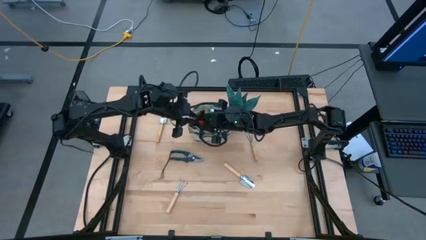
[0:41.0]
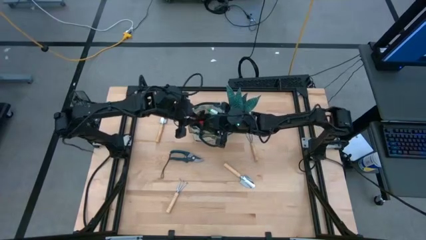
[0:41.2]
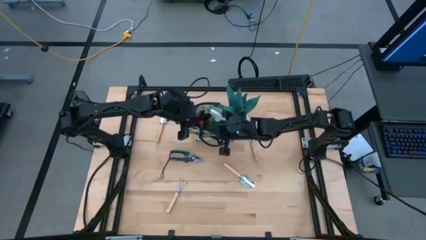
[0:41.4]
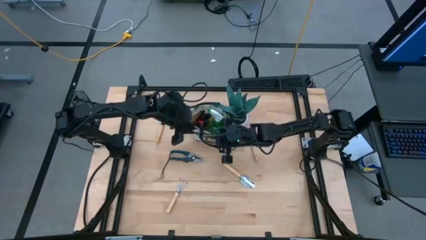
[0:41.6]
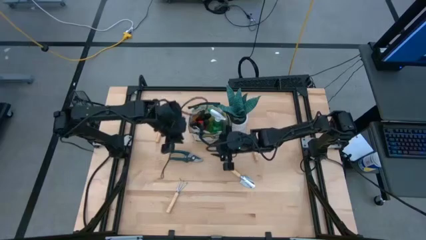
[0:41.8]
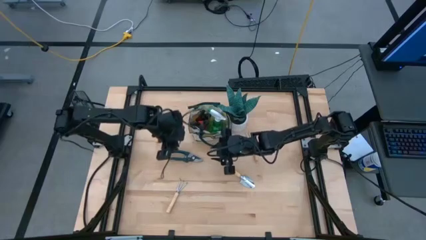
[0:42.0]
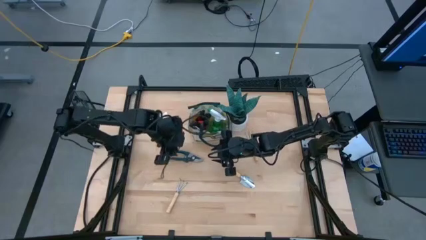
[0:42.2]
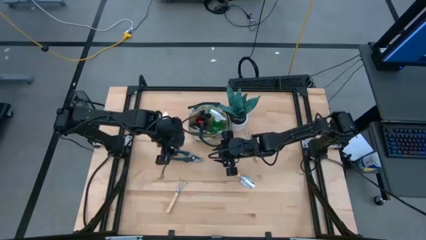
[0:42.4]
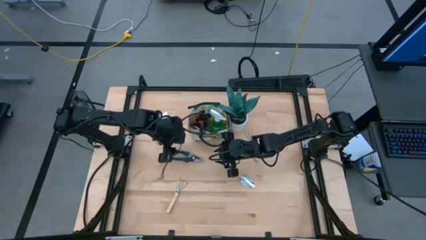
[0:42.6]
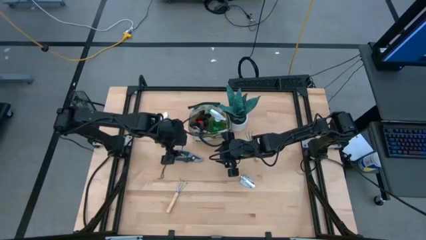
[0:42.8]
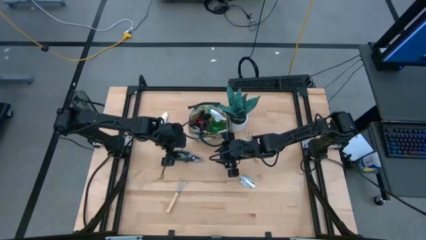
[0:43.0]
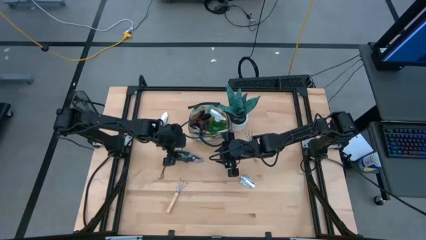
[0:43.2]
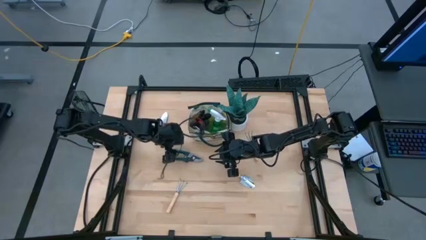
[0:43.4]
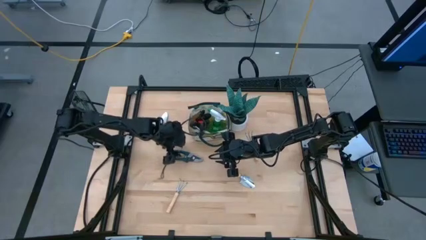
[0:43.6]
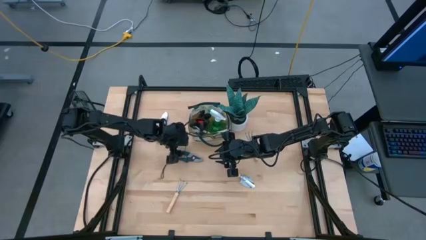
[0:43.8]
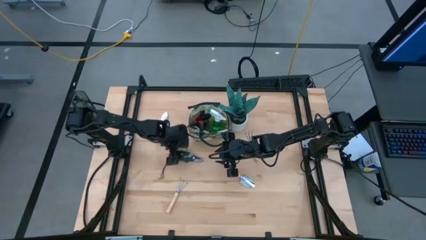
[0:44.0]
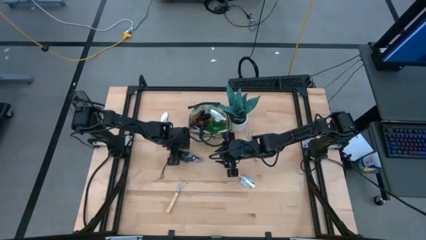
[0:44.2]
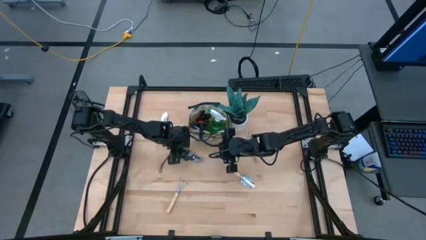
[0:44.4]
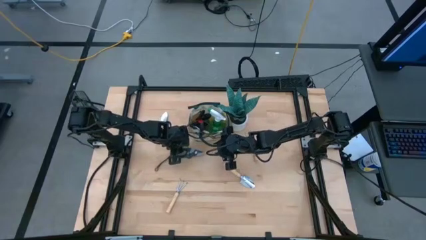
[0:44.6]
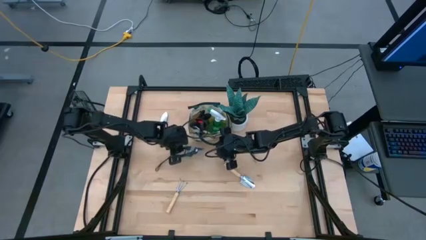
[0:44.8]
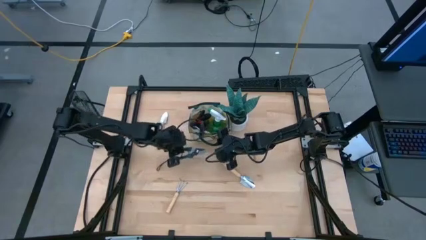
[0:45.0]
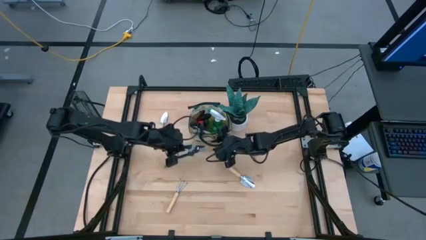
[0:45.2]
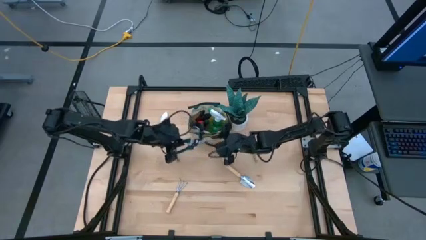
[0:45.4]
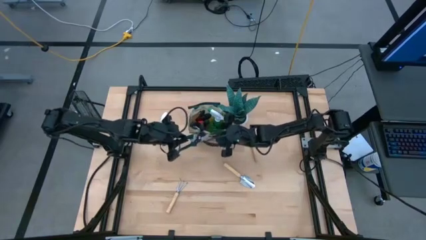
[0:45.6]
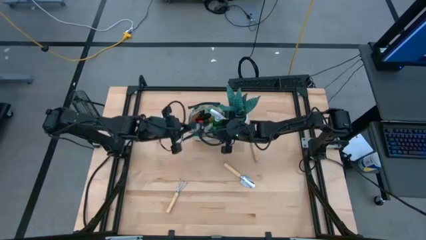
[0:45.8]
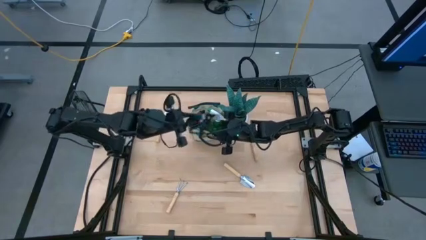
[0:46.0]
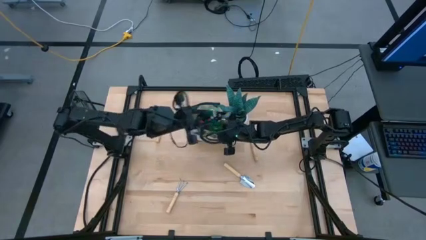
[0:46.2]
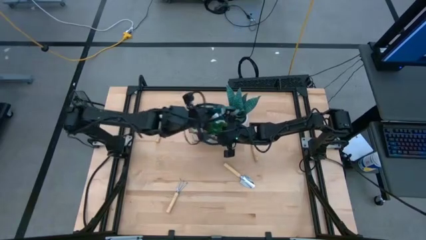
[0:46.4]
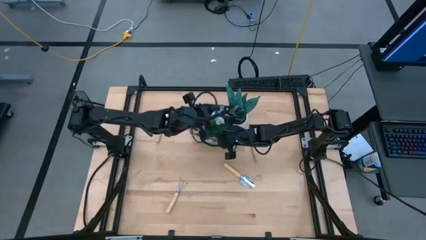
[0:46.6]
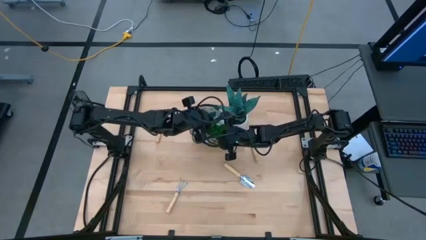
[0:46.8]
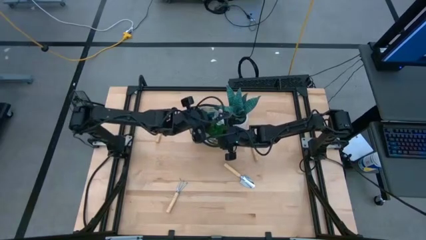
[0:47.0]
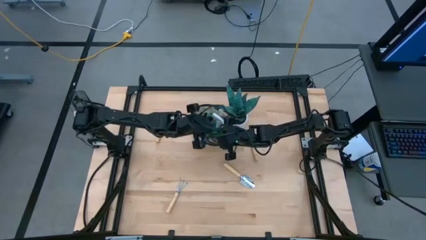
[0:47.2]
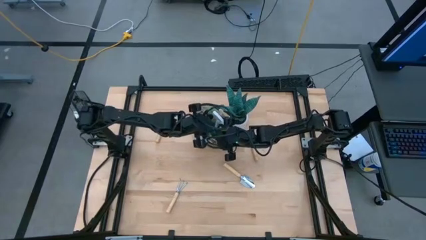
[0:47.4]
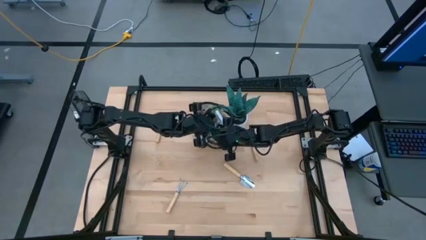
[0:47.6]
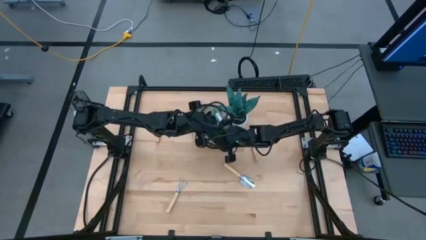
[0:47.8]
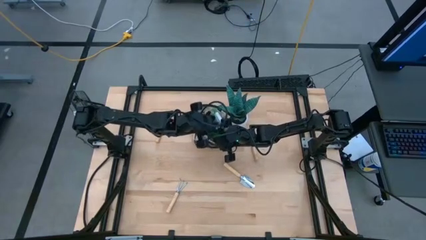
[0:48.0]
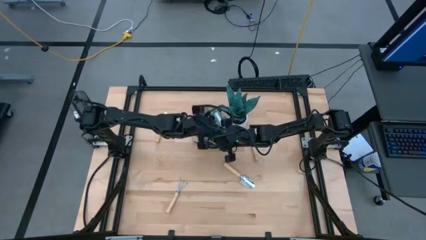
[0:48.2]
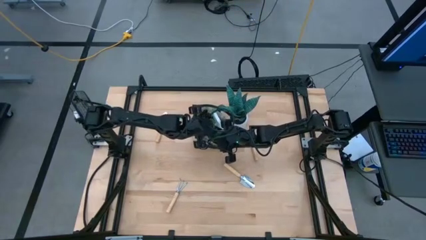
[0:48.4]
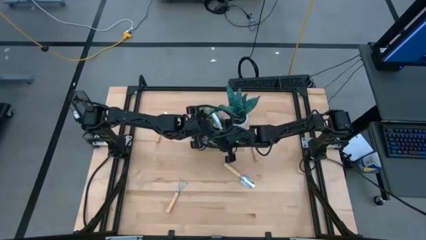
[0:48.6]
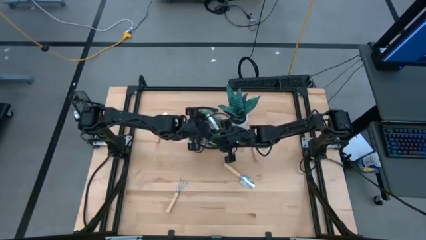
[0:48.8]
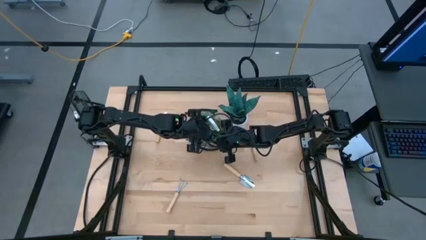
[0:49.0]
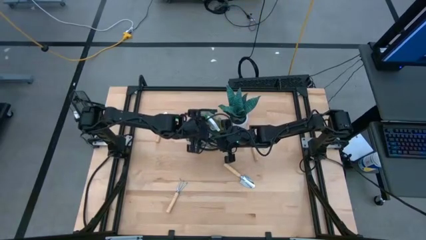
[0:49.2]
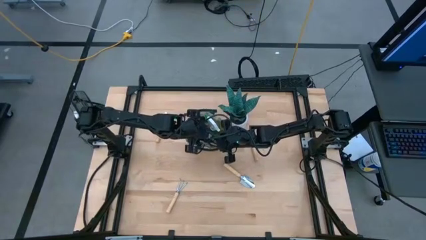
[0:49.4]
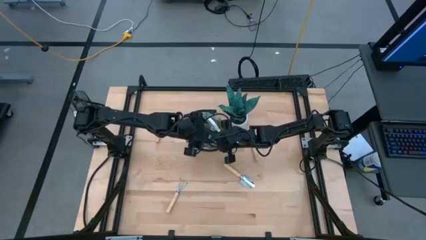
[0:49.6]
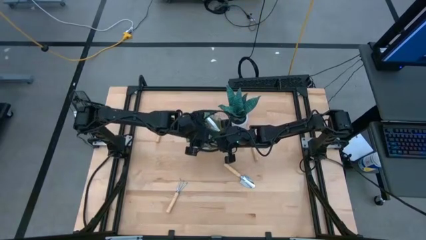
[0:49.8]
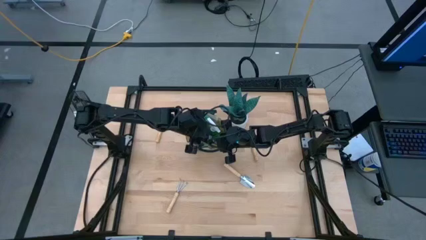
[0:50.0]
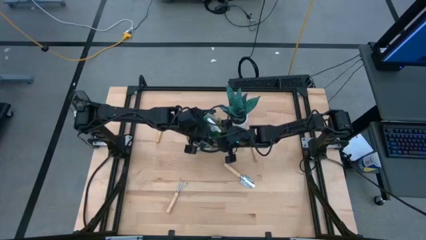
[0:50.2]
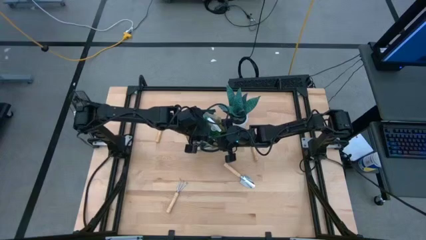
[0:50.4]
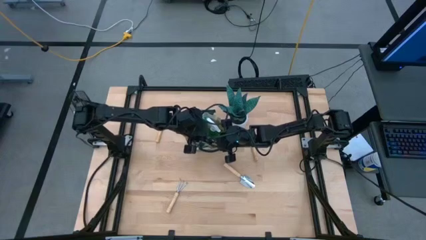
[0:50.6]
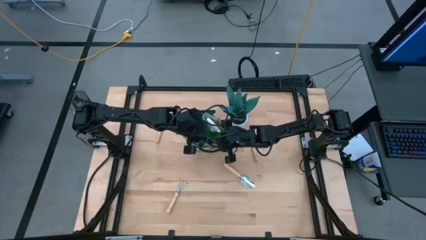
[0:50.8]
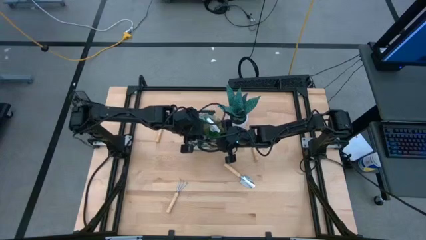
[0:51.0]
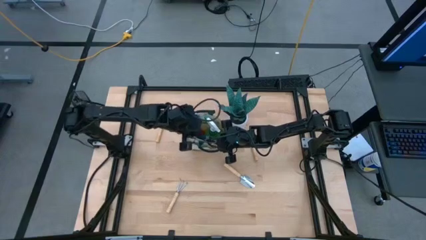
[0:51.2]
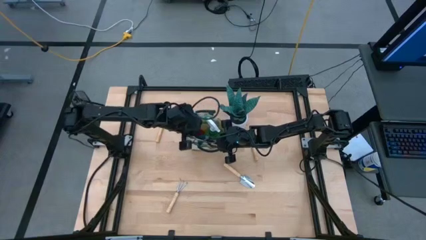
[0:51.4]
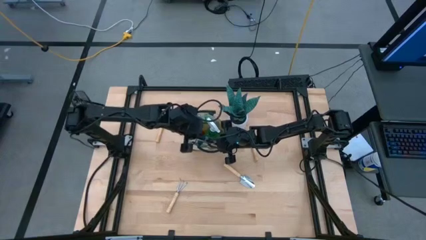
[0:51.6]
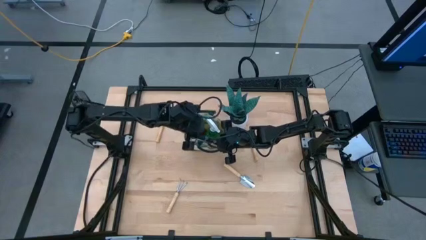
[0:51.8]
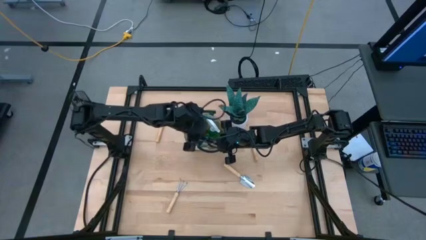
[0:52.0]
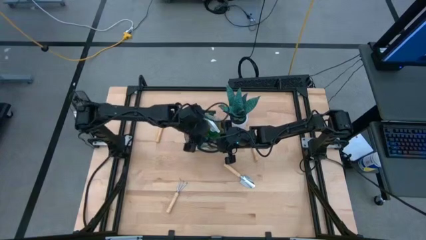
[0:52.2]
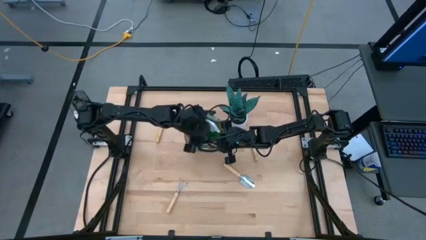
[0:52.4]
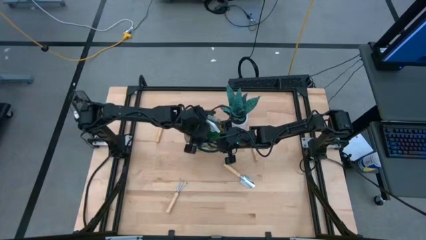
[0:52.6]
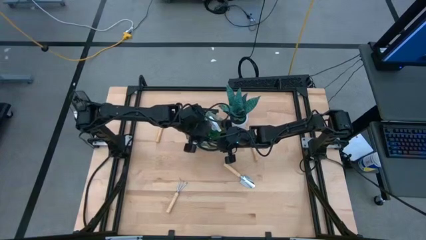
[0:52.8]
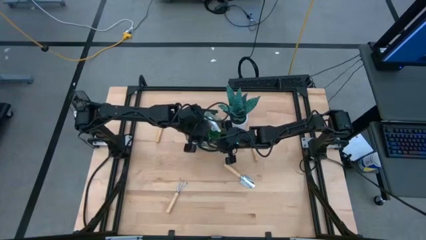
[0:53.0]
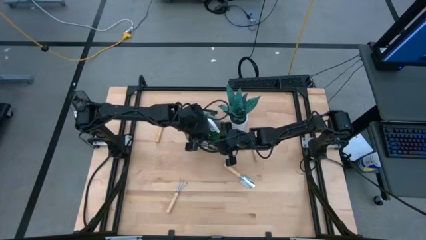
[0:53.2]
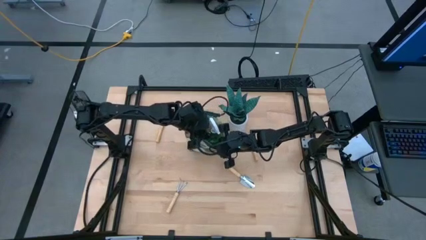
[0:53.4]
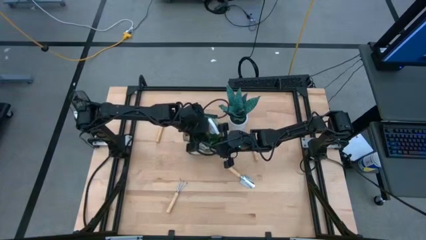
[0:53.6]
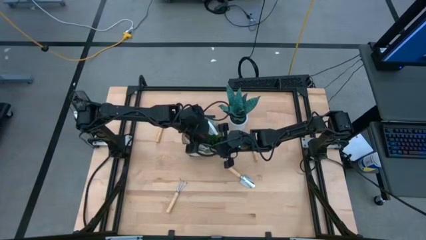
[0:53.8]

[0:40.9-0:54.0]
Task: Pick & Place Garden tools in Gardening bag
Put the green shear scissor into the white gardening bag

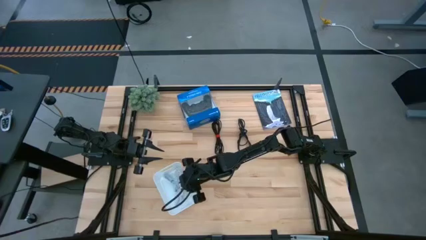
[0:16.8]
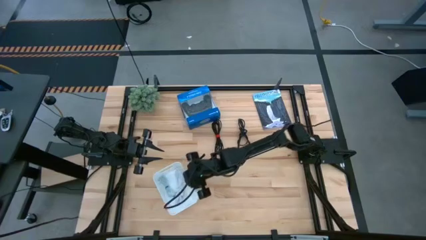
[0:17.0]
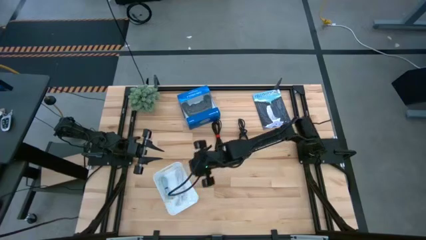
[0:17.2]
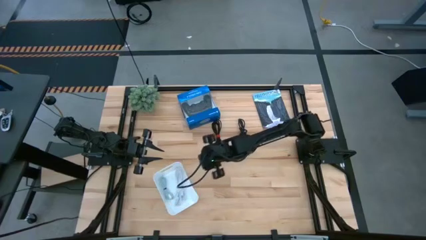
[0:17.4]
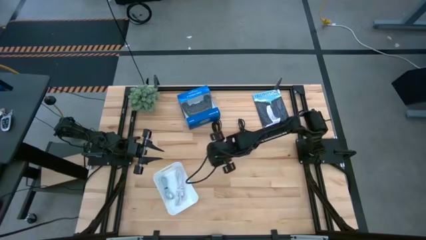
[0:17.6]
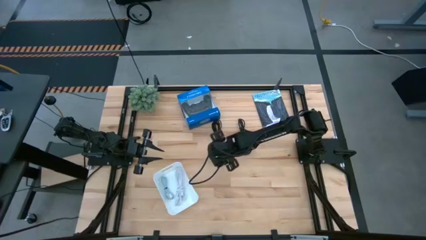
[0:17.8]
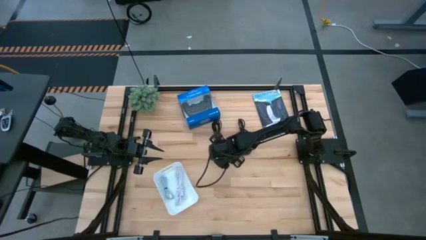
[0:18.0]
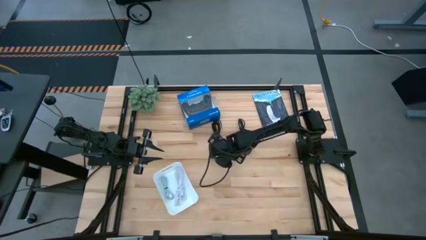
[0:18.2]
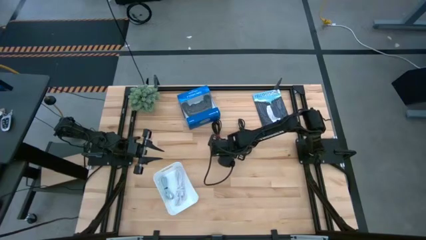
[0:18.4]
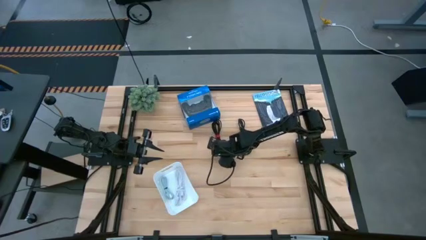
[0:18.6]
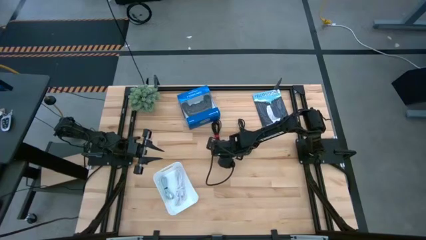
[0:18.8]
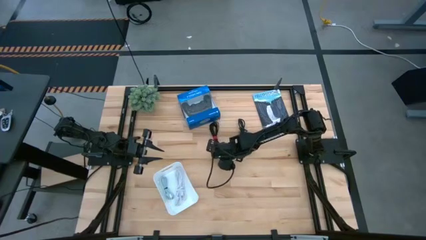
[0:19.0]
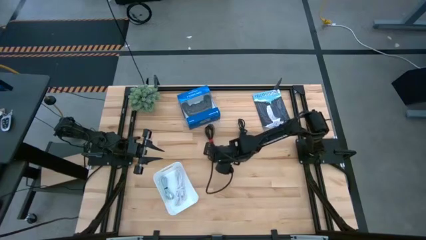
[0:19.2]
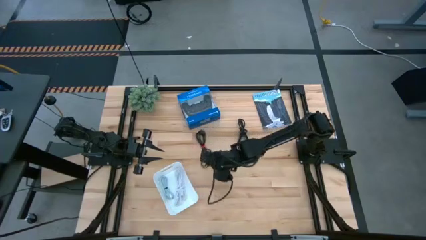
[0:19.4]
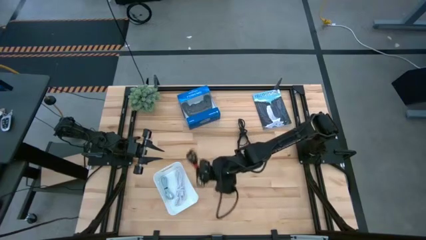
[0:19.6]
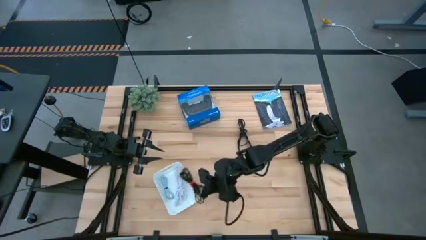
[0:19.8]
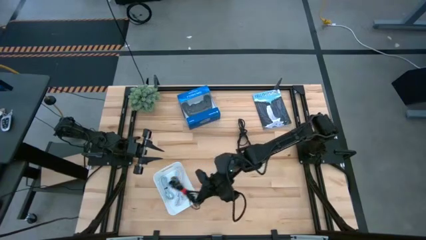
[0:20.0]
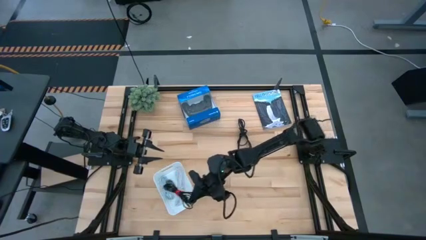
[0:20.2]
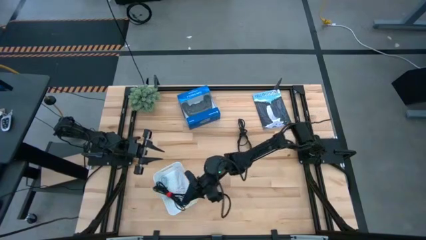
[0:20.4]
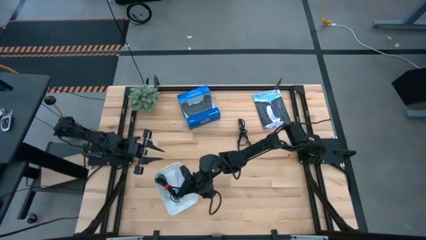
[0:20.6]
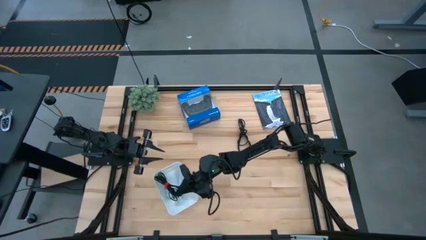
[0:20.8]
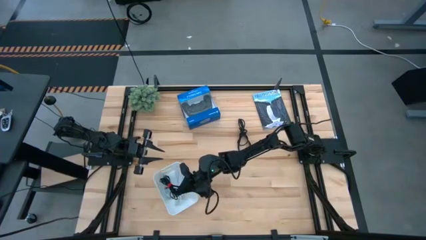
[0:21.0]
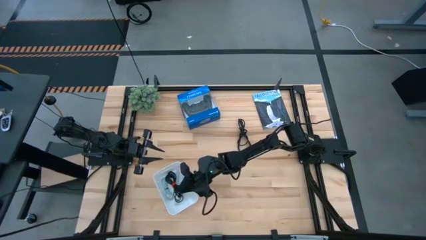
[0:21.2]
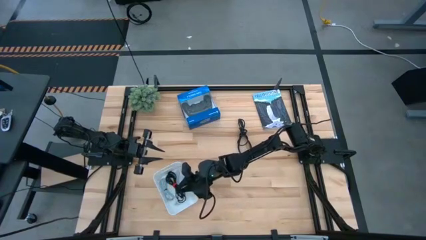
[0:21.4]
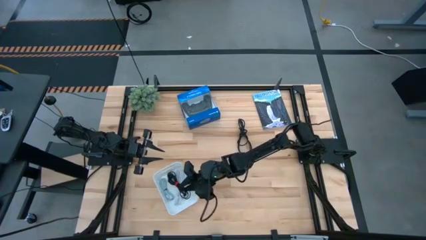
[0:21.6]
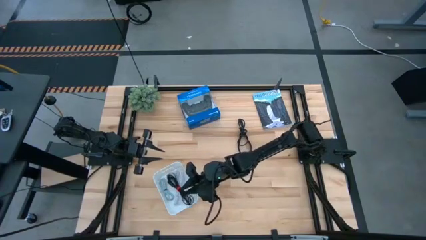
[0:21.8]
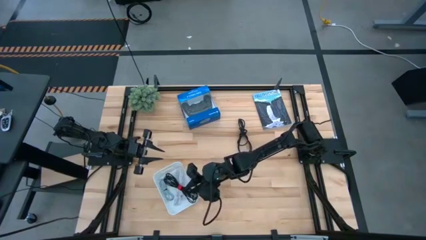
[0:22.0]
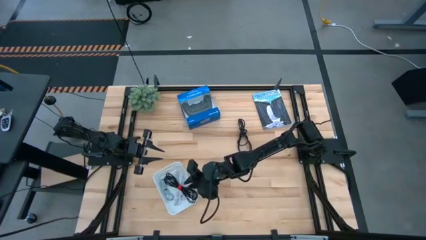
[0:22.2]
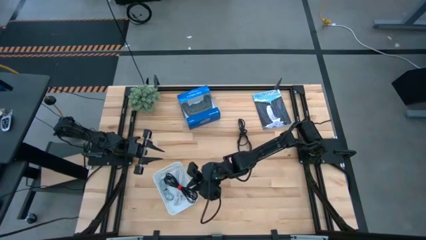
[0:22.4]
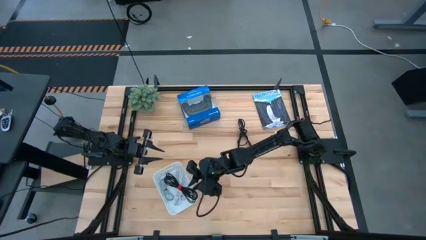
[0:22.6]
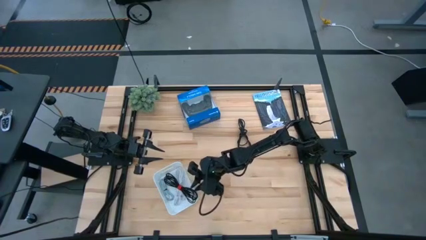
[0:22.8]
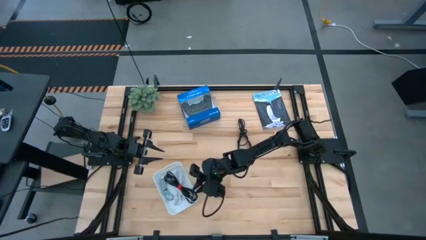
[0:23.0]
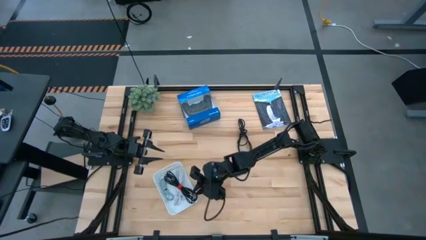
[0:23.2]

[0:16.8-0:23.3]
Task: Pick and place USB-C Cables
Put the left black charger cable into the white basket
